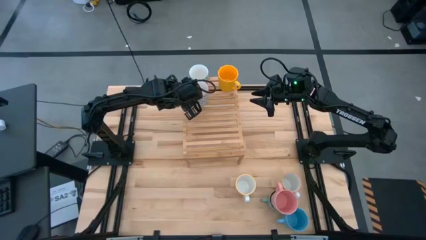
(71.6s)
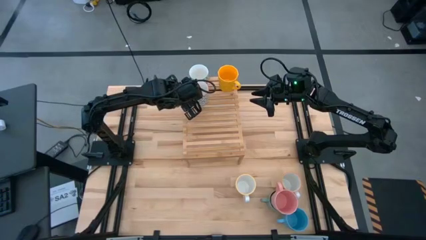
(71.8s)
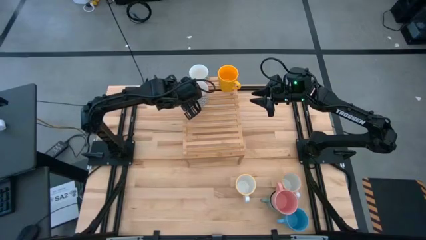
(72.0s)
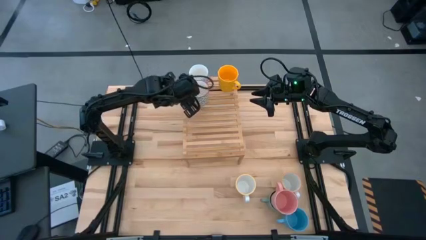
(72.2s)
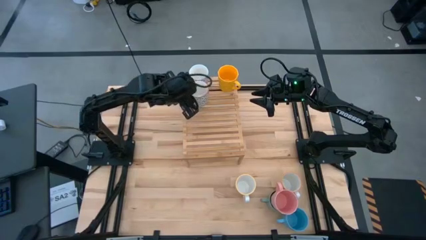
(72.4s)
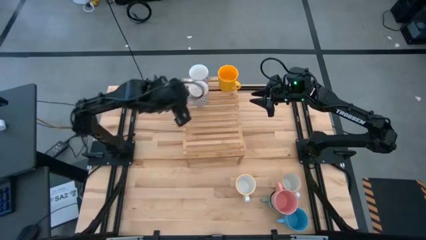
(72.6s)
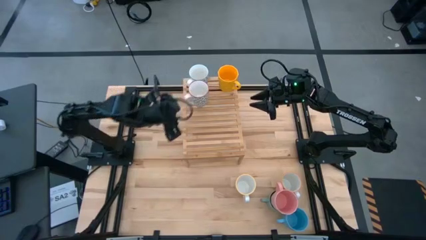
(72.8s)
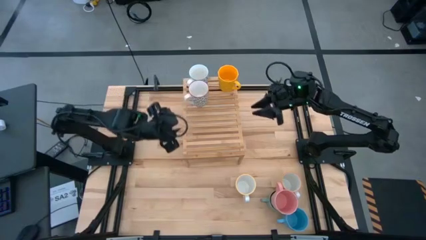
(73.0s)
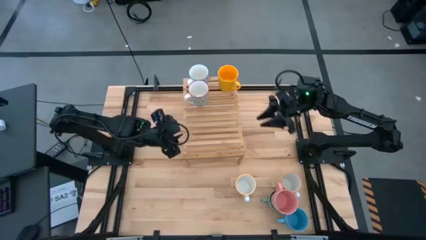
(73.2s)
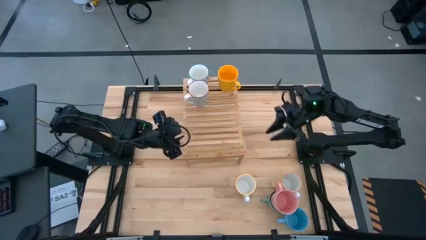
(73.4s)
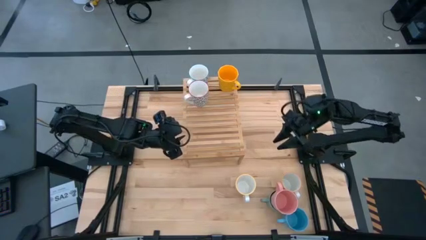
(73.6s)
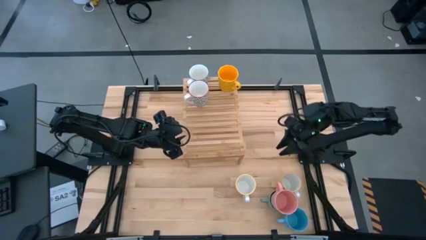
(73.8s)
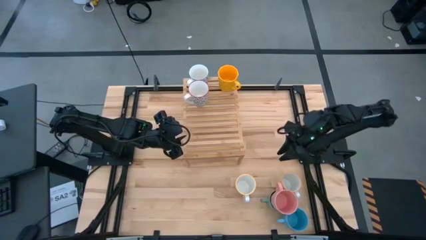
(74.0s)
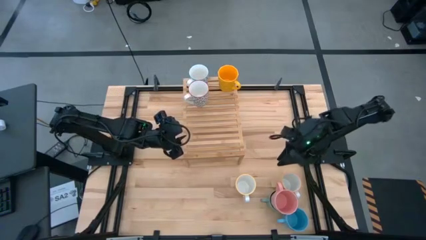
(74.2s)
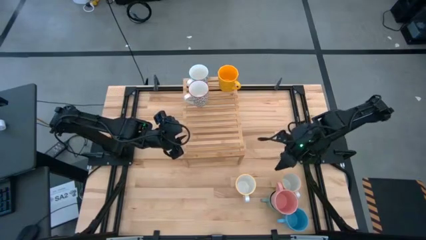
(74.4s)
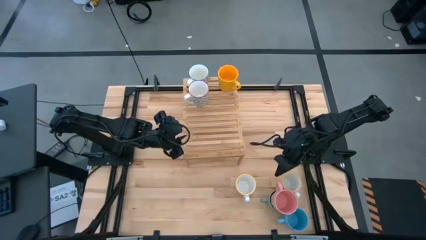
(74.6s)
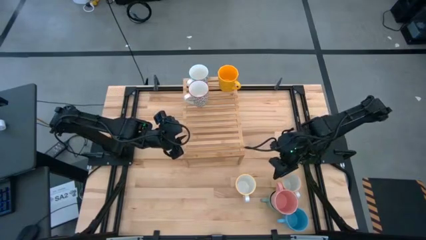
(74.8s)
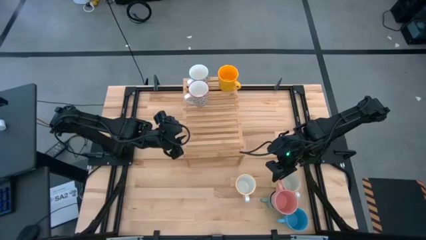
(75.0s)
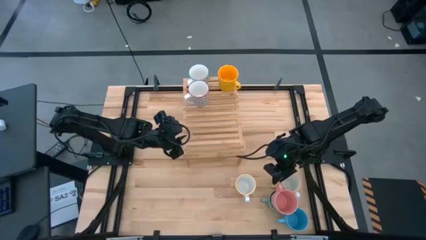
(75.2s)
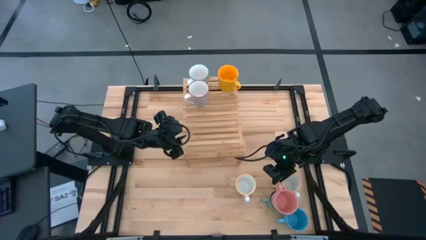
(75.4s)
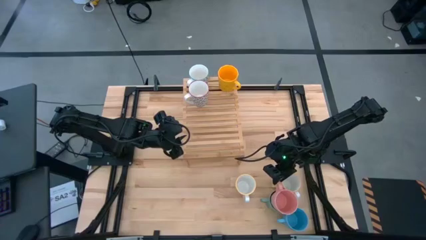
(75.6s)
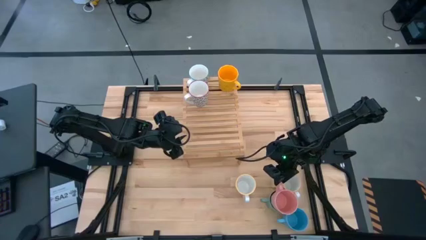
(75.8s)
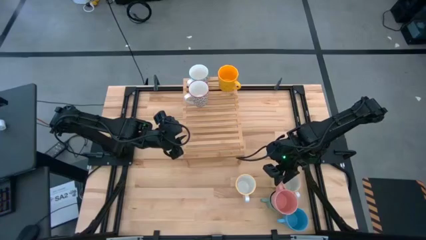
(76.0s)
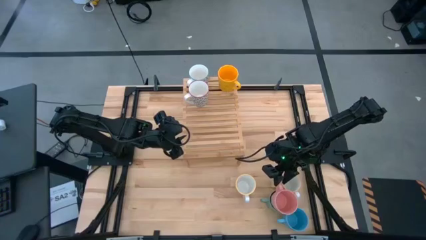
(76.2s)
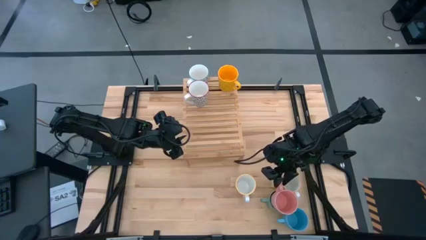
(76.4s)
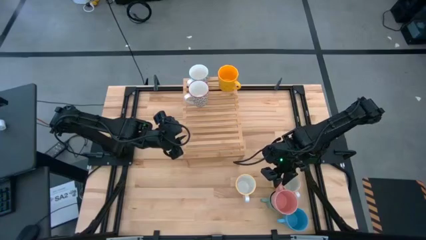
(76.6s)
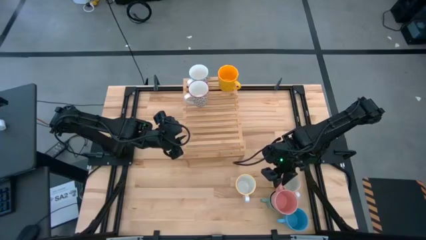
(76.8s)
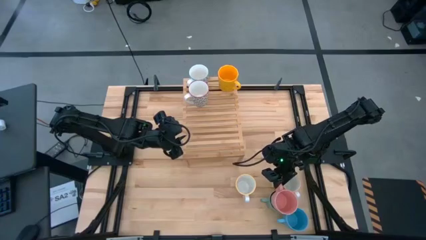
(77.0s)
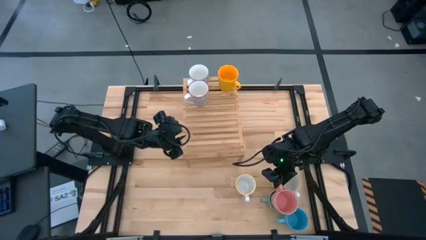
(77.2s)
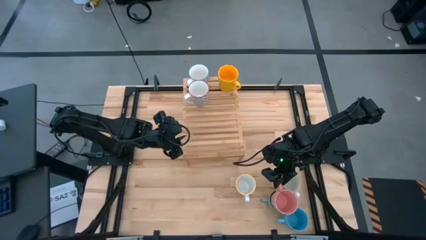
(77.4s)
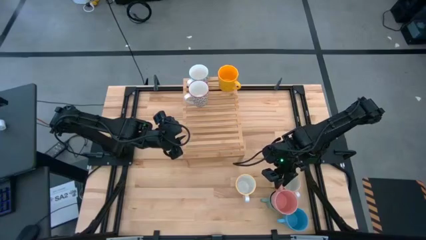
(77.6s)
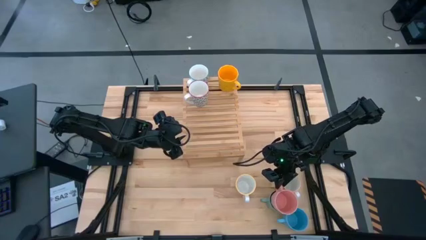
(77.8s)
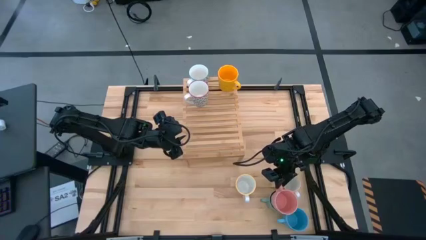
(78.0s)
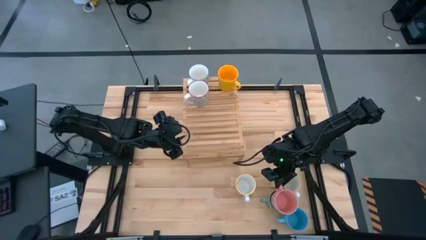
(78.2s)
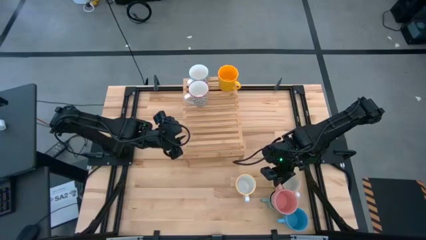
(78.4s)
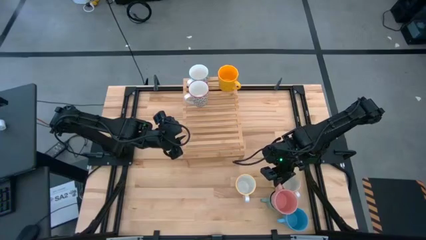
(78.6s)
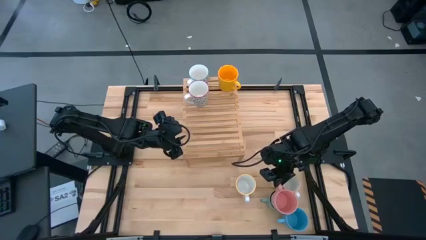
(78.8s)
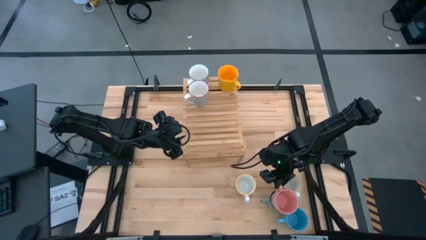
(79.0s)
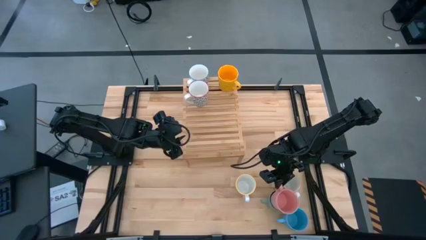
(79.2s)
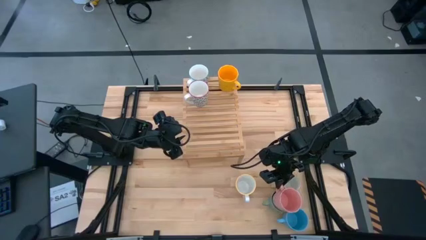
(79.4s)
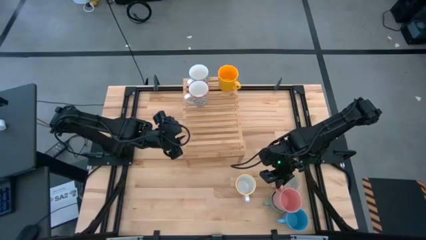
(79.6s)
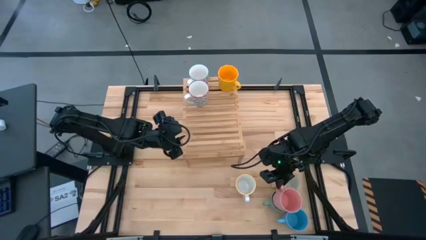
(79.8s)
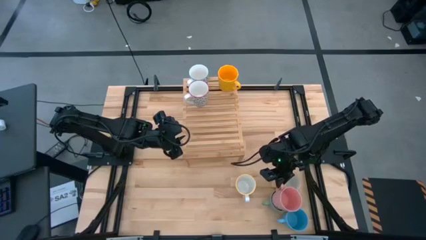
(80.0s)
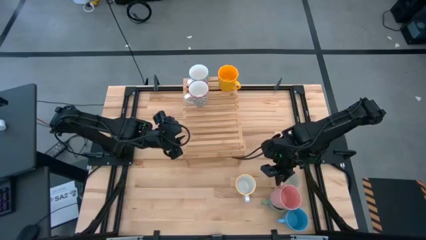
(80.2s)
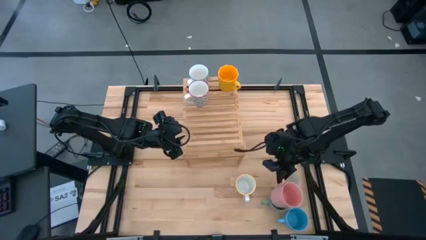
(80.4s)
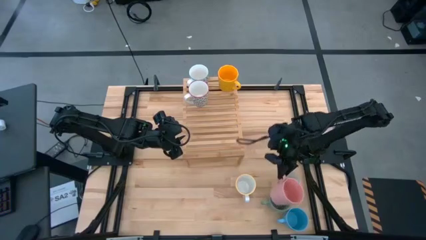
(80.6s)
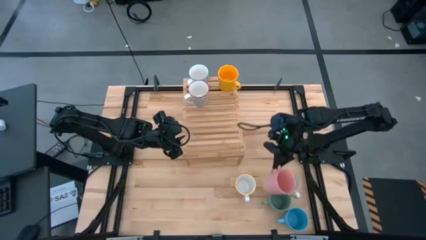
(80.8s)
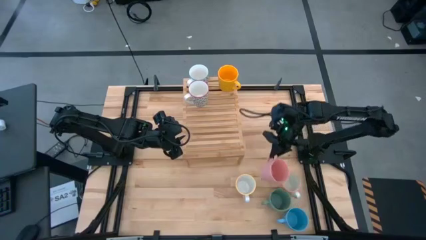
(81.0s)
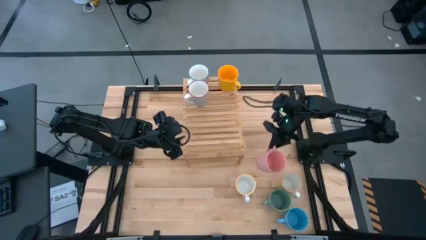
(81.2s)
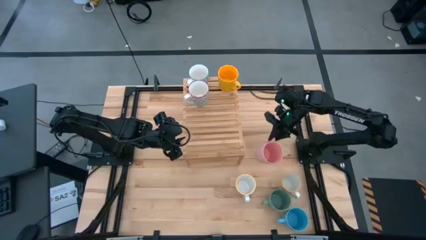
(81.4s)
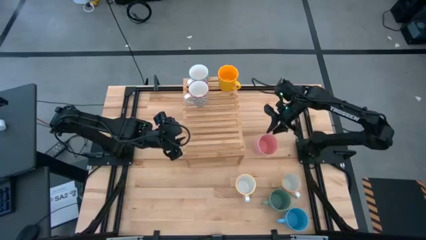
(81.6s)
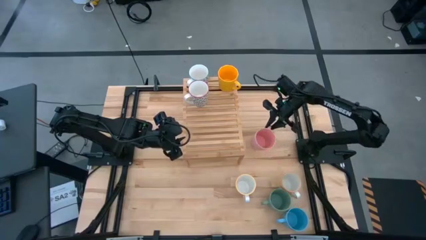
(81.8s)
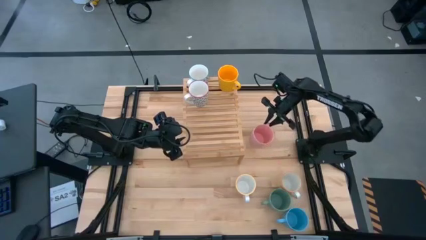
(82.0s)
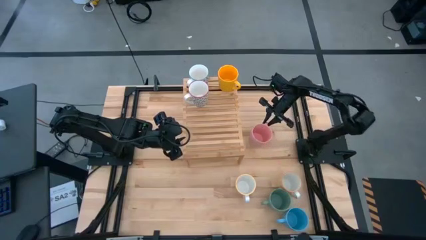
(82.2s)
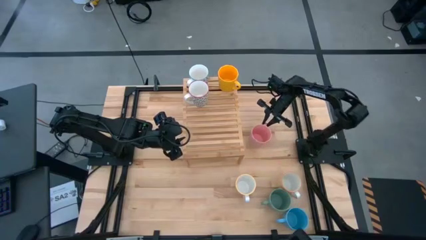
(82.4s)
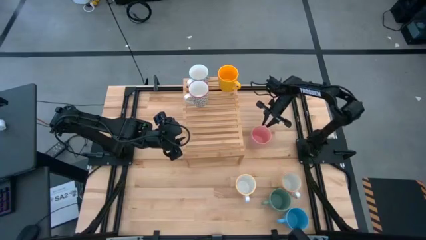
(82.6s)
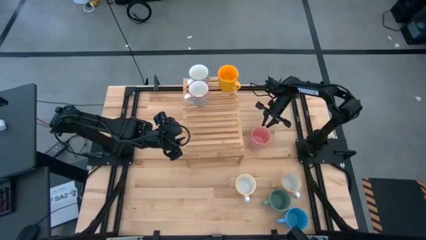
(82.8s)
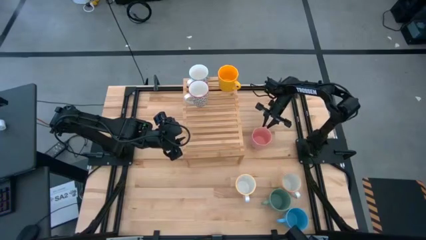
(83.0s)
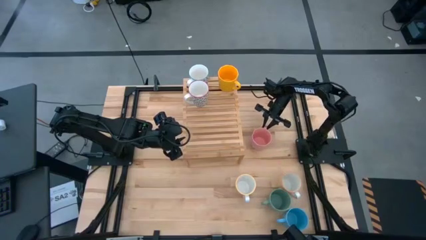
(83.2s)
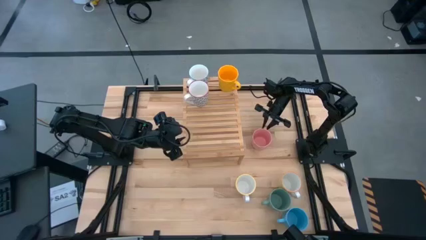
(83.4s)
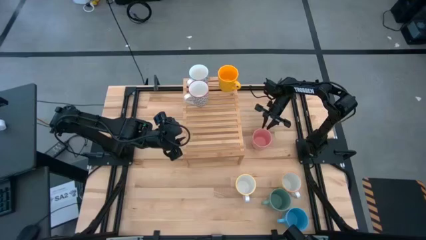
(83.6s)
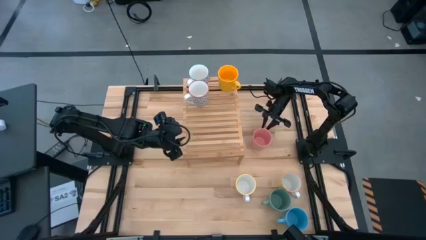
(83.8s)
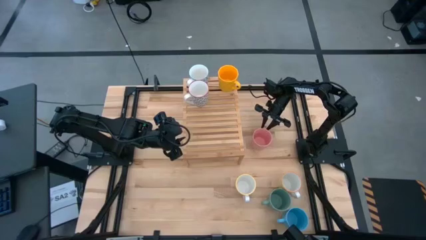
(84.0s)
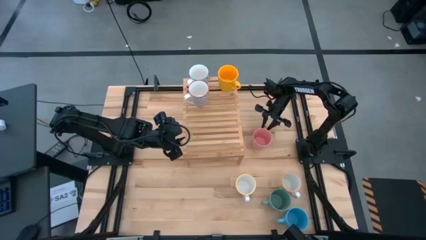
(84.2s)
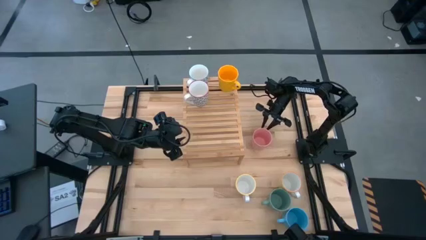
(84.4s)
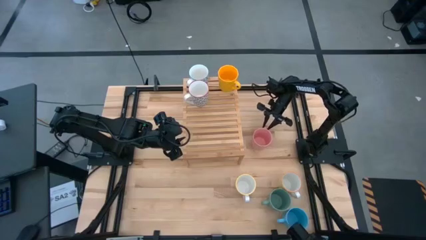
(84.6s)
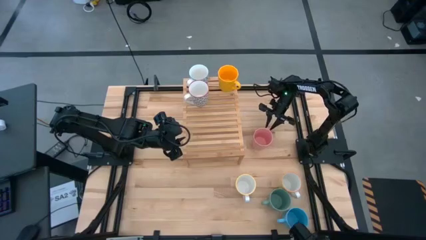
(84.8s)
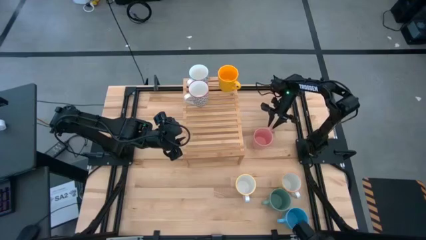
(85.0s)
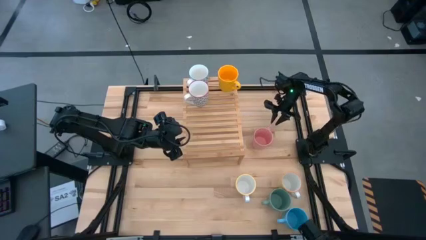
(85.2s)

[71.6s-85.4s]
Task: Place coffee mugs
Put the pink cup on the shelf aligned with the other yellow cup

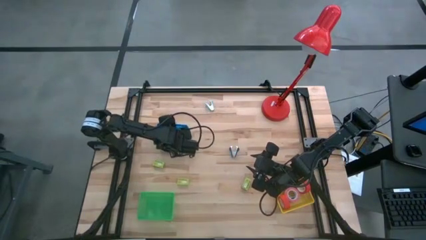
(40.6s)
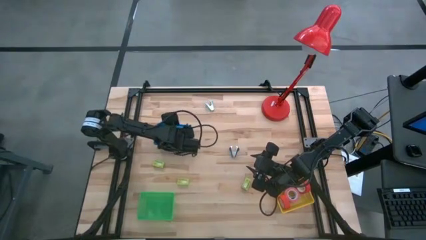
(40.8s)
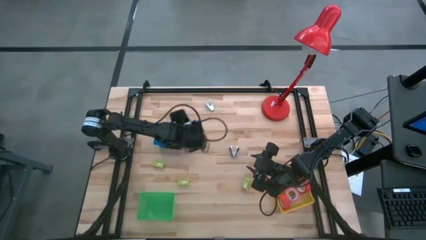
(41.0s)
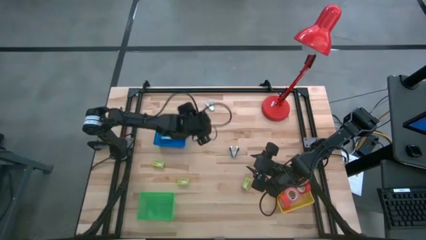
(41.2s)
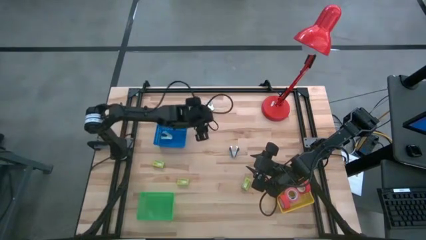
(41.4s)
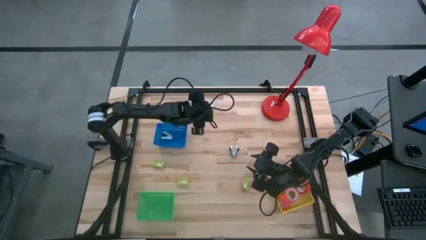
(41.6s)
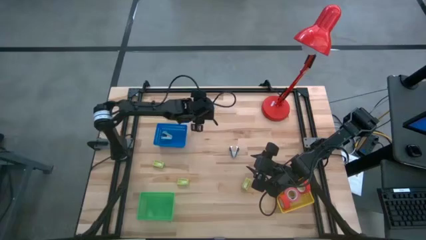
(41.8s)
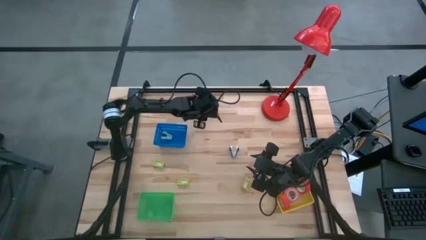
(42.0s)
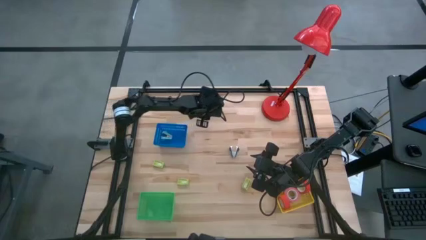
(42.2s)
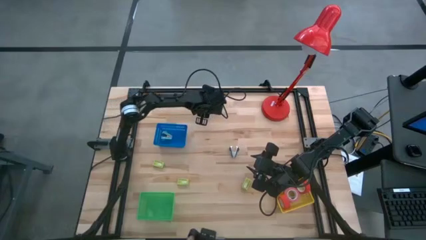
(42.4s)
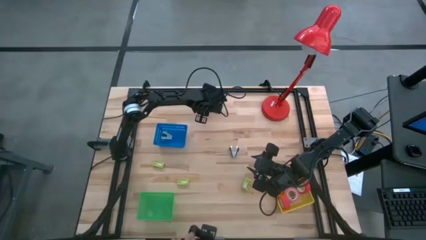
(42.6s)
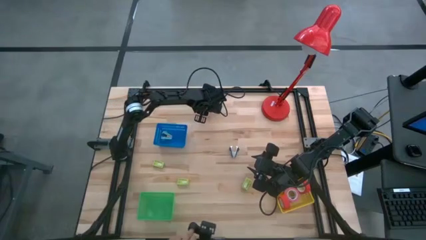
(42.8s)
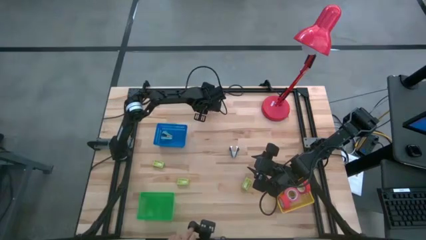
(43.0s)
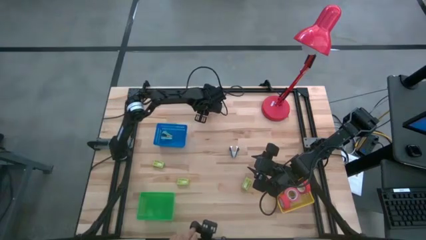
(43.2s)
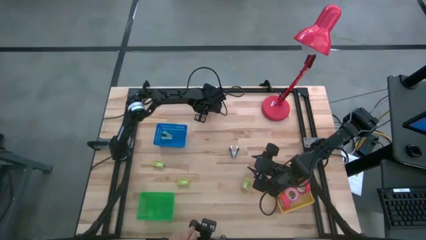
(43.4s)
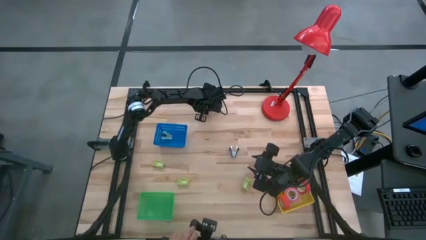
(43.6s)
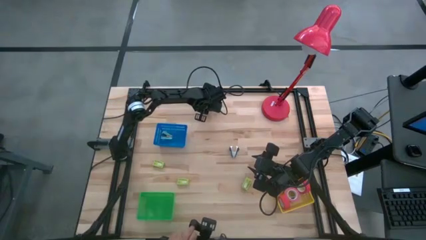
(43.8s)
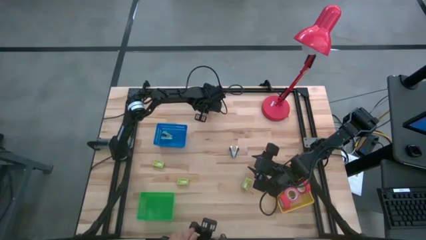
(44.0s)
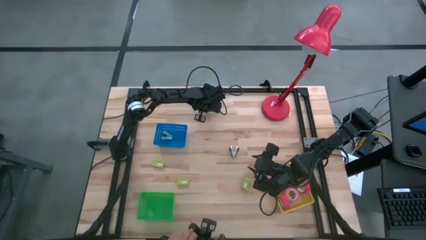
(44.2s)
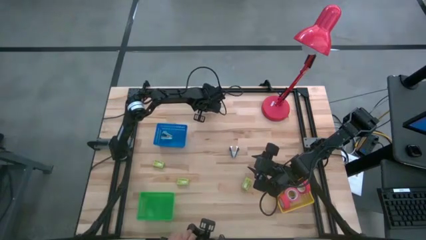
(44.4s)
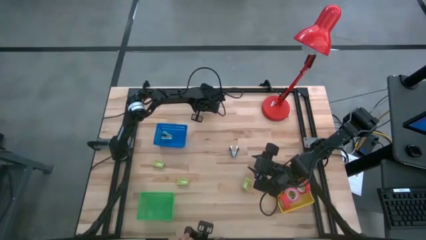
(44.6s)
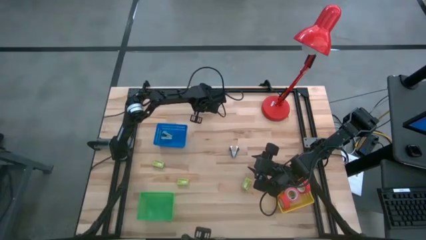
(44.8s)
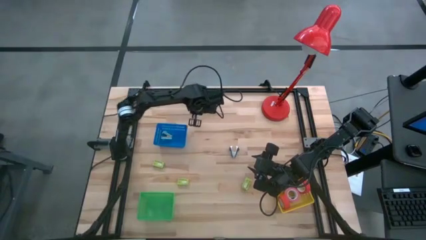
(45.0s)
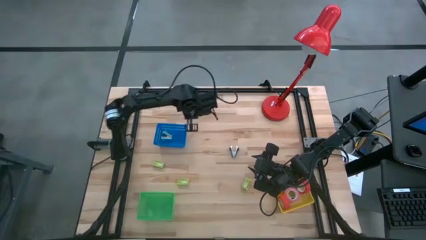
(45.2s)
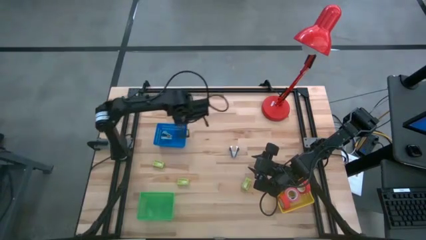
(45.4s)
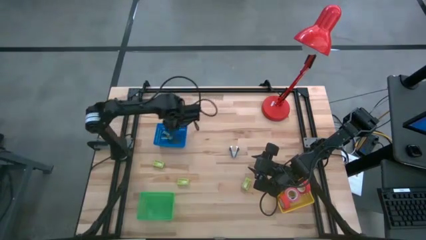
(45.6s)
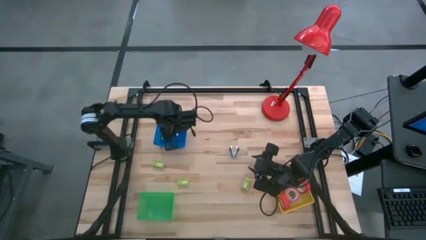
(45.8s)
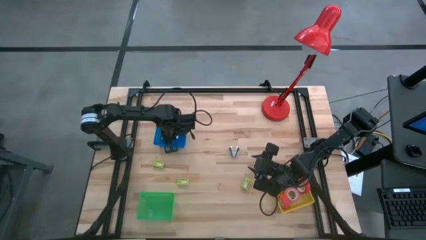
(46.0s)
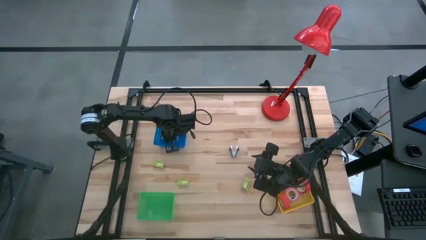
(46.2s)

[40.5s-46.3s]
Task: Pick and place Stapler, Stapler remover, tape
Put the sky blue staple remover into the blue bin
